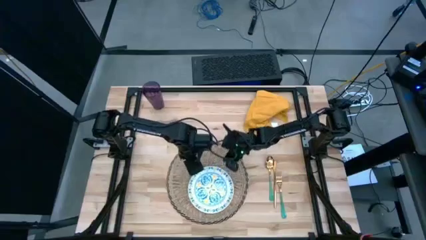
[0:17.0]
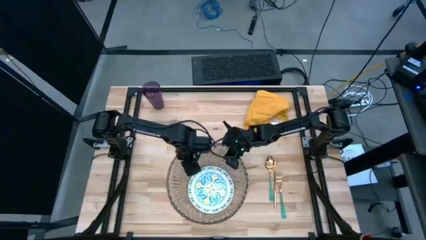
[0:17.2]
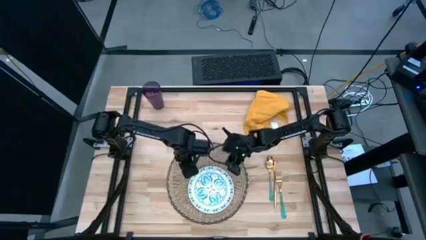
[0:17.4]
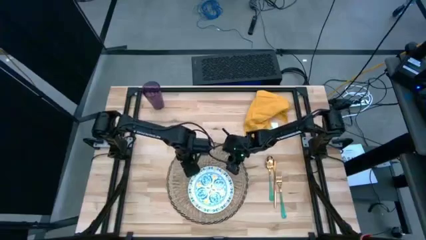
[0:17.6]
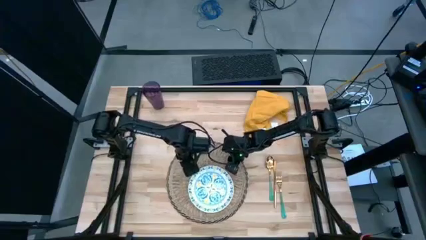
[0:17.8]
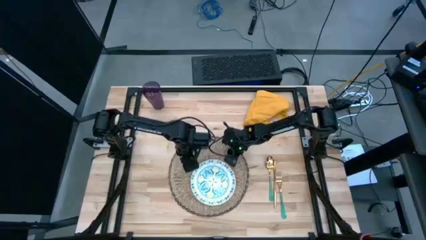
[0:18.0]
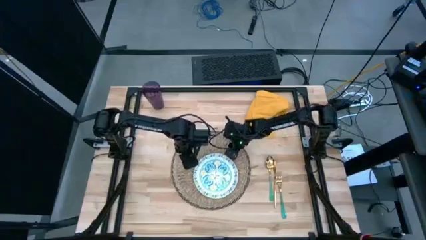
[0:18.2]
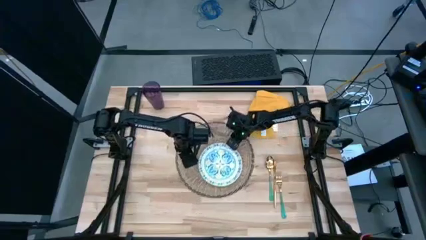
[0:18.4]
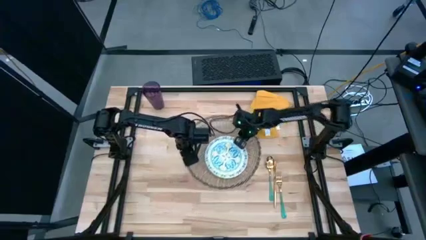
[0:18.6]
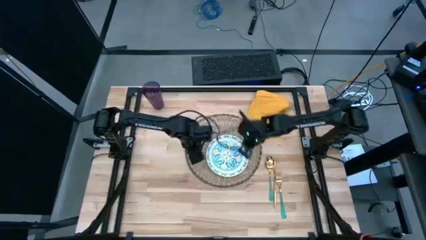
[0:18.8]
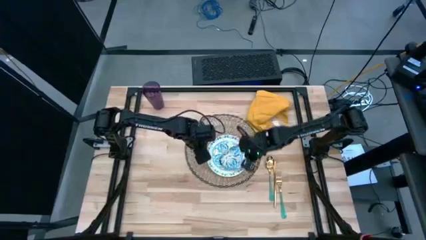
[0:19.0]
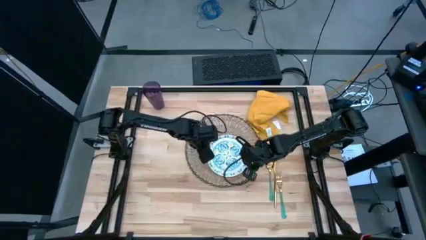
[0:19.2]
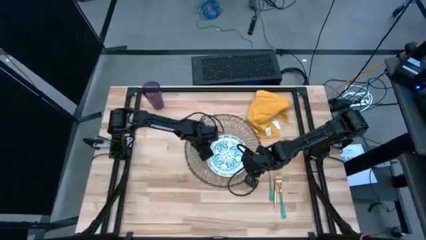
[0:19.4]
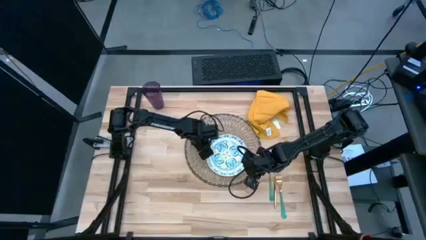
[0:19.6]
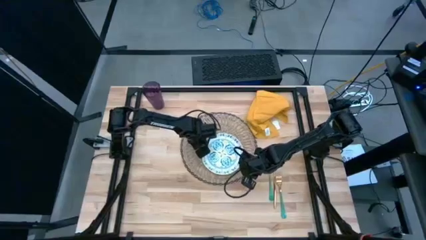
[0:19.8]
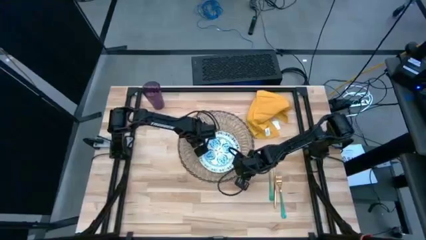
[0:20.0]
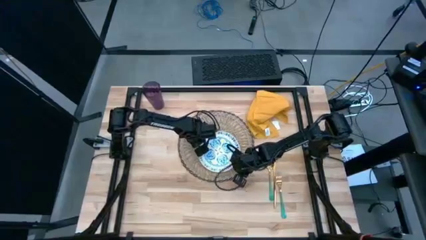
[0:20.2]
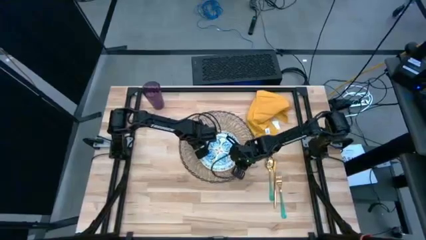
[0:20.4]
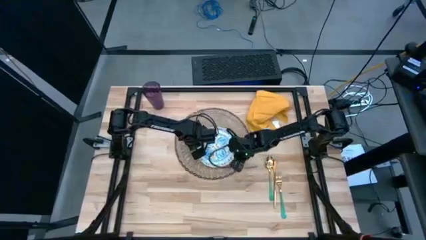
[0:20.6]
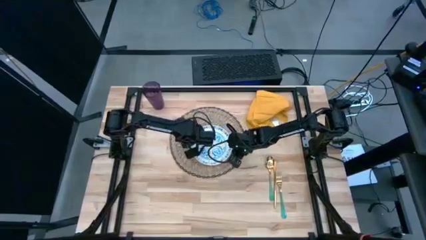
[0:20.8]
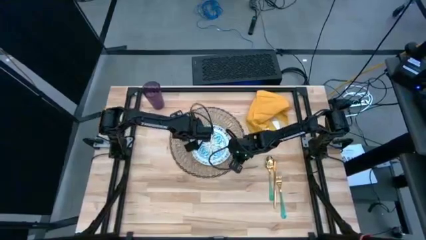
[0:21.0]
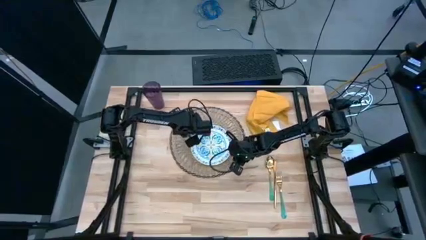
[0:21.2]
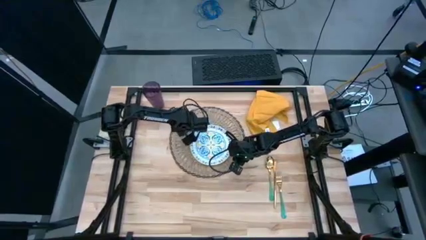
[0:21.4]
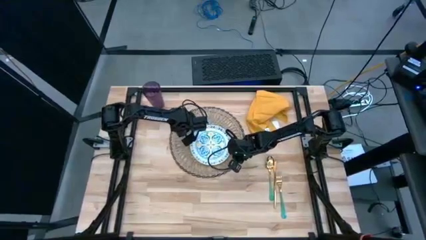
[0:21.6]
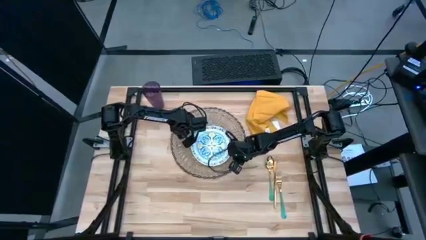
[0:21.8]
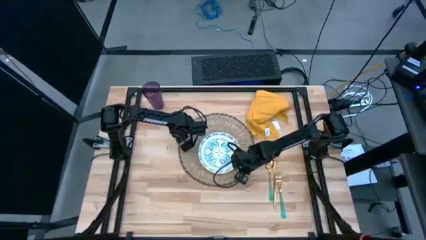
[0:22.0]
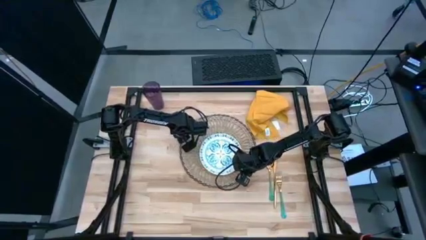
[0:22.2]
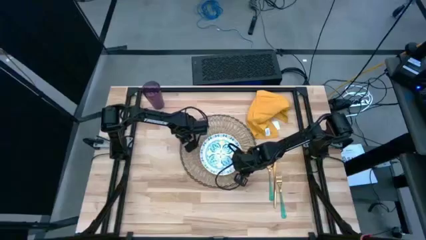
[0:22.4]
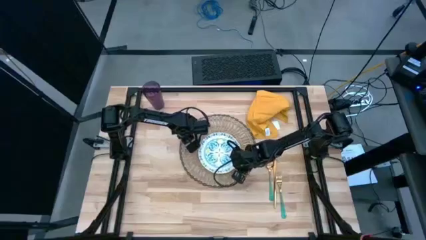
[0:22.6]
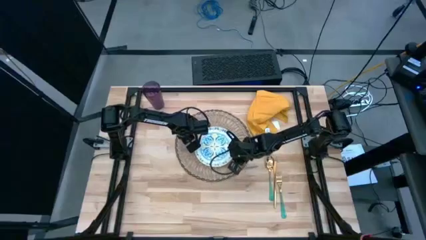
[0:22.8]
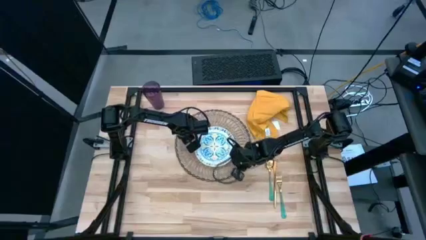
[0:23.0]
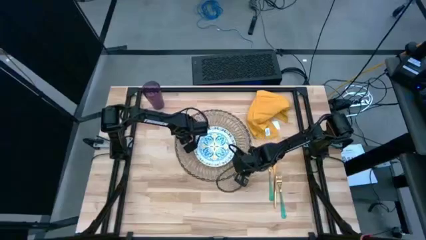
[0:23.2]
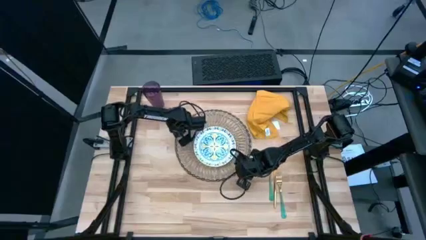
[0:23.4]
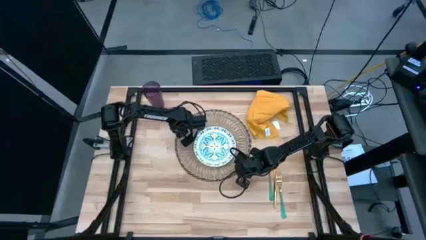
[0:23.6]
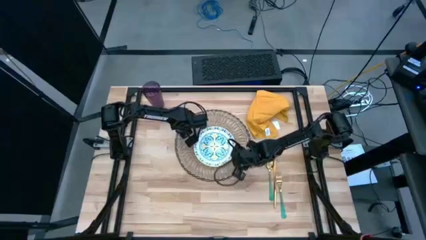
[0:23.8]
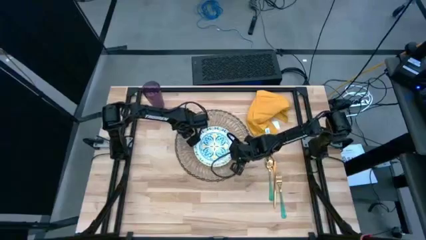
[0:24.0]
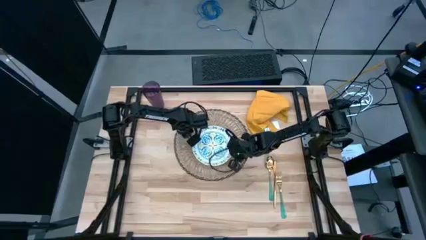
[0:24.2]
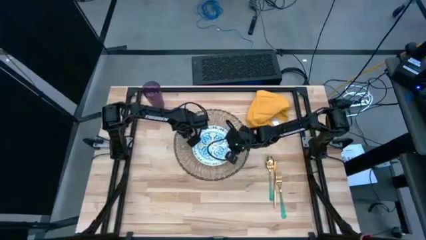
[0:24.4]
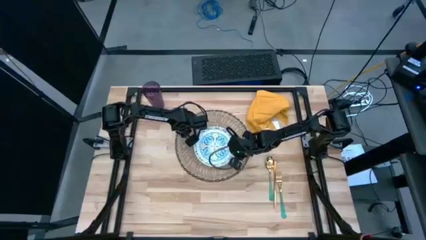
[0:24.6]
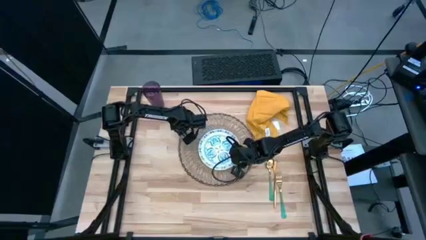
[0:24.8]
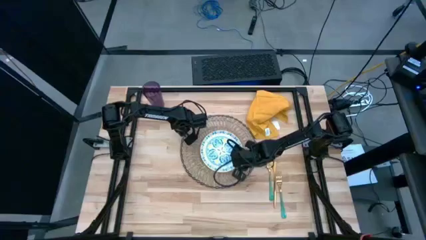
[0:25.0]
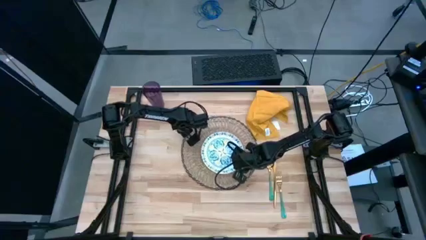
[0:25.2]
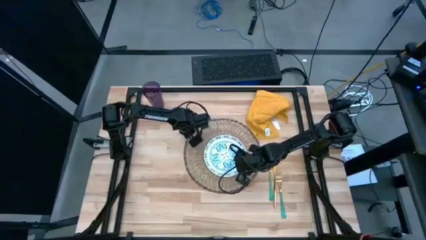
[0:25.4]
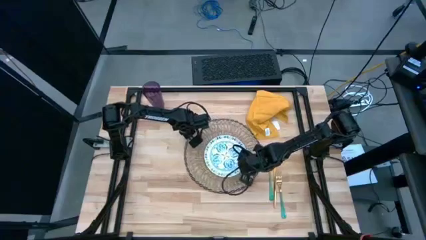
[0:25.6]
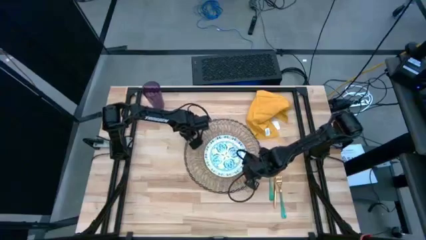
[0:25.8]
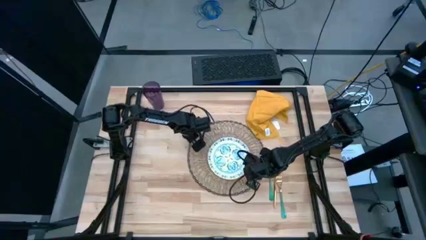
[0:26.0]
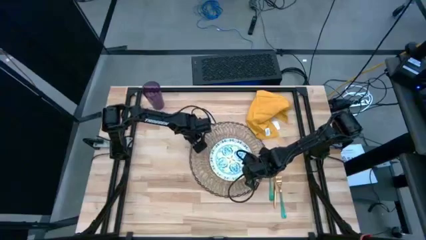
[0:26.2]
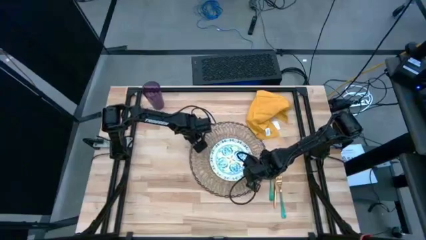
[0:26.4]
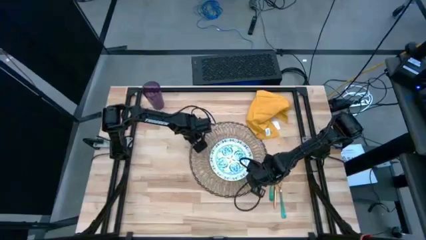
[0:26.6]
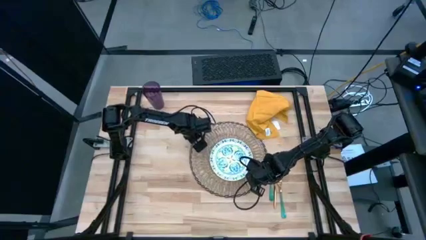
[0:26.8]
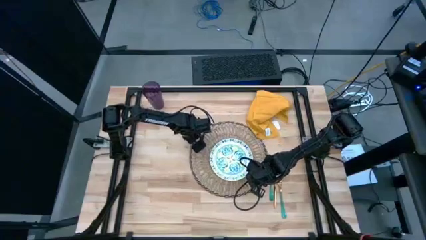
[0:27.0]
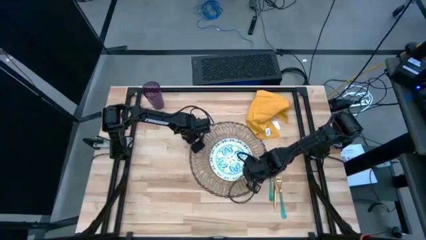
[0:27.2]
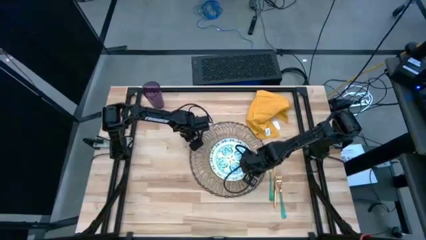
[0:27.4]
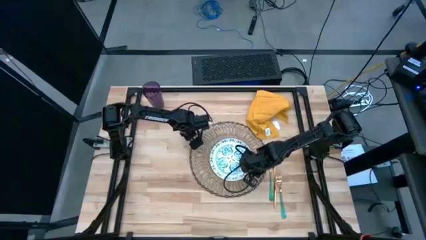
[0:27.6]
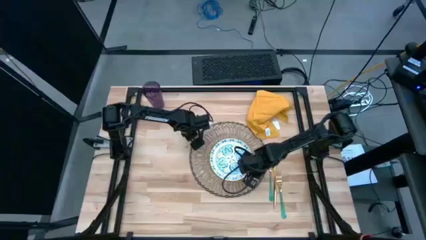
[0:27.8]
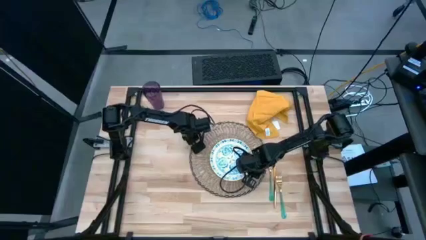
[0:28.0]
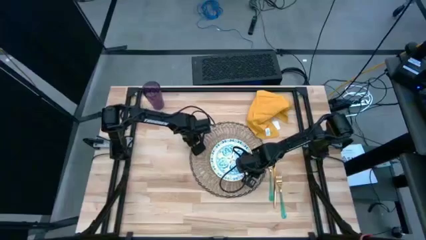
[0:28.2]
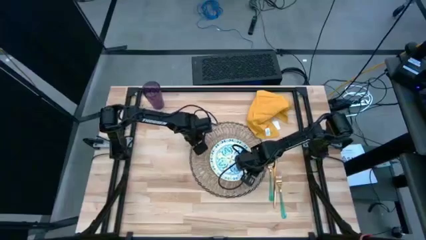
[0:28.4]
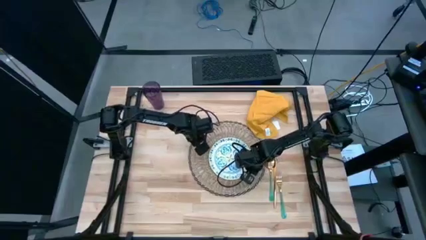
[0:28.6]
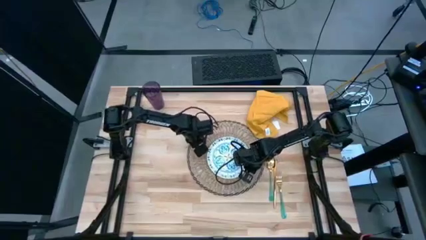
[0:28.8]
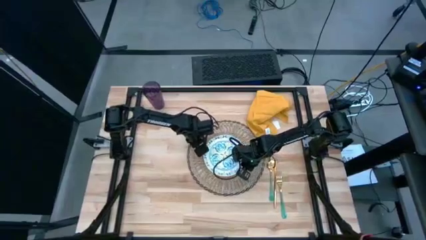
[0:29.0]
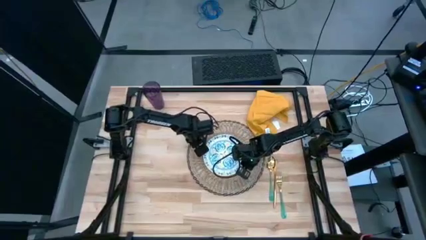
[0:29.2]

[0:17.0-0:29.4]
Task: Set table place
Put the white patterned plate on the tablemat
